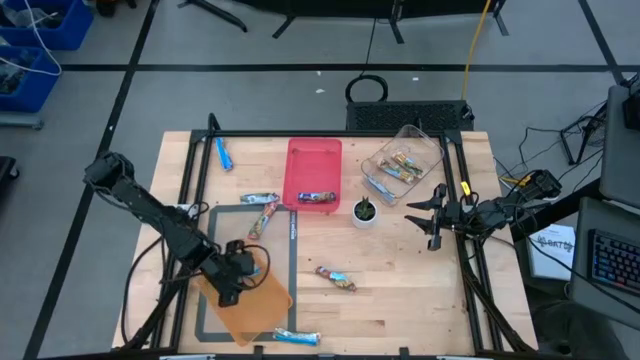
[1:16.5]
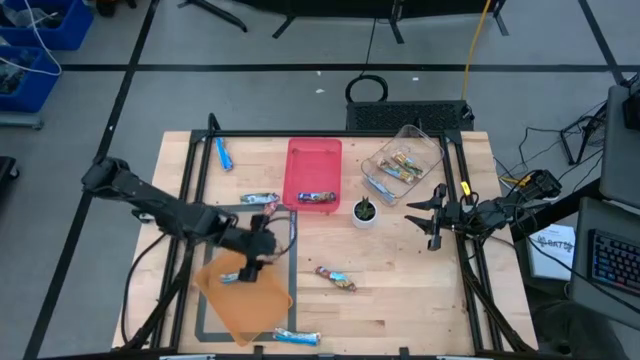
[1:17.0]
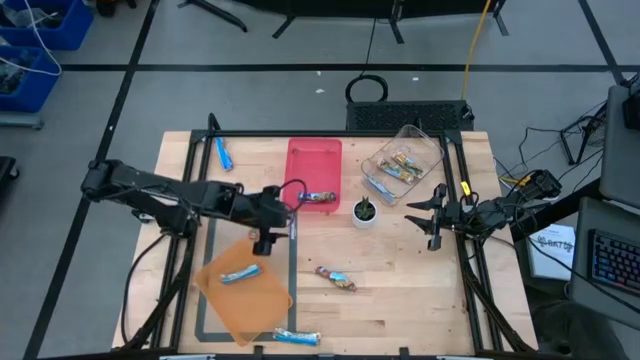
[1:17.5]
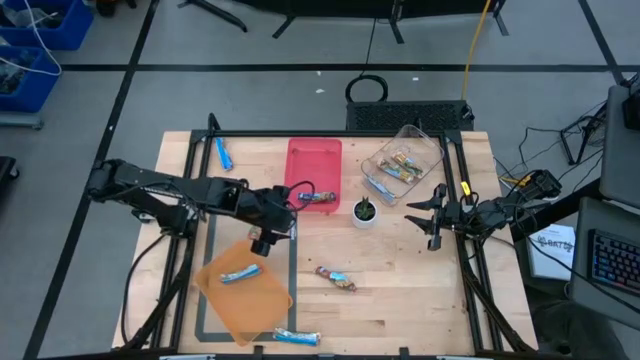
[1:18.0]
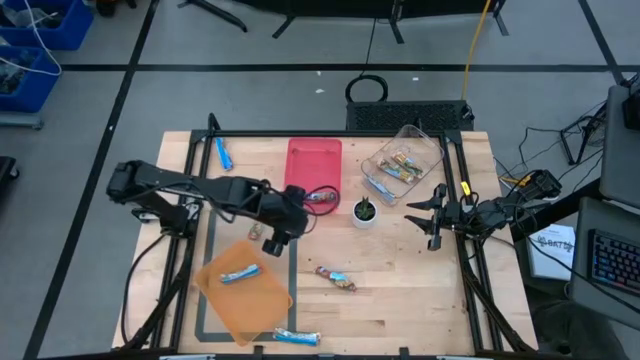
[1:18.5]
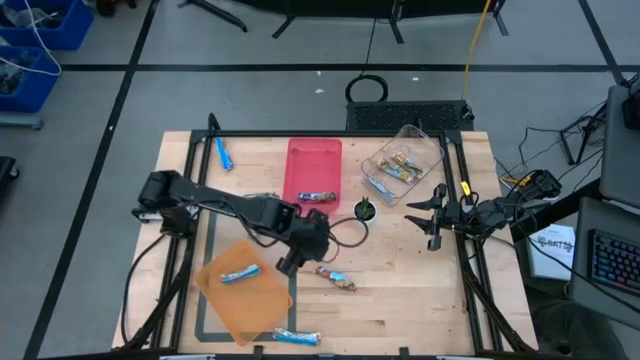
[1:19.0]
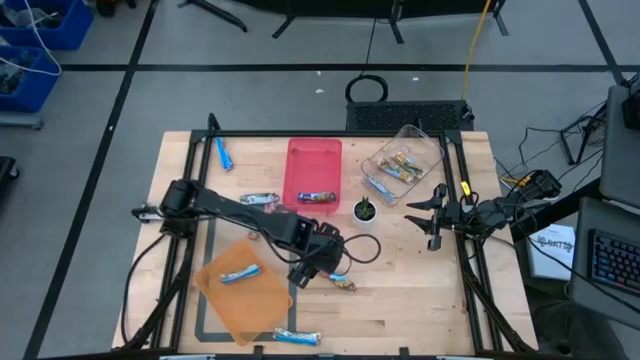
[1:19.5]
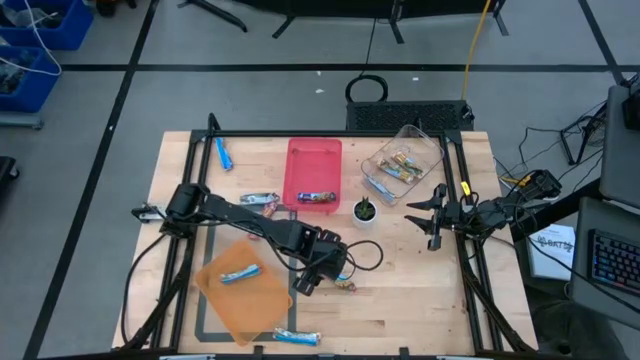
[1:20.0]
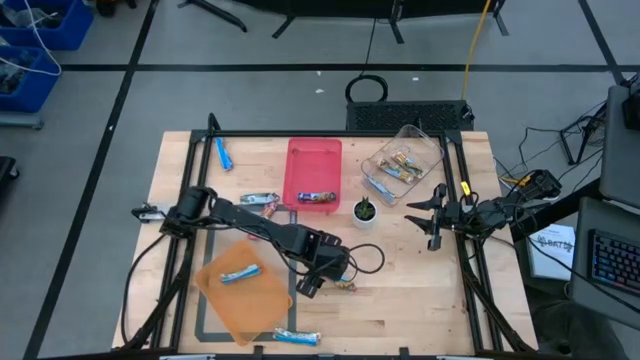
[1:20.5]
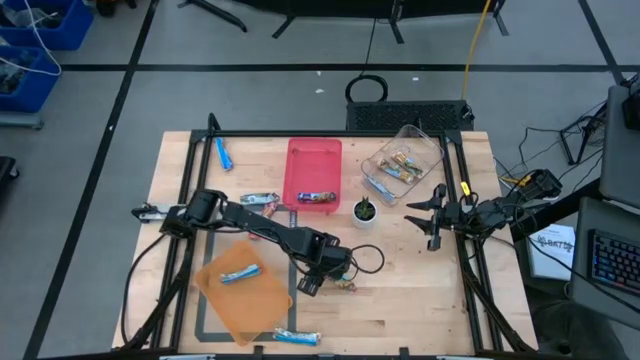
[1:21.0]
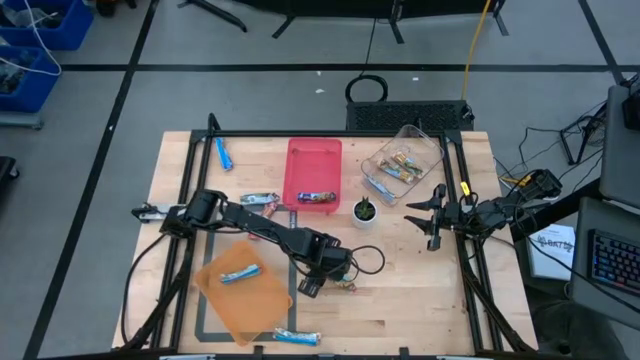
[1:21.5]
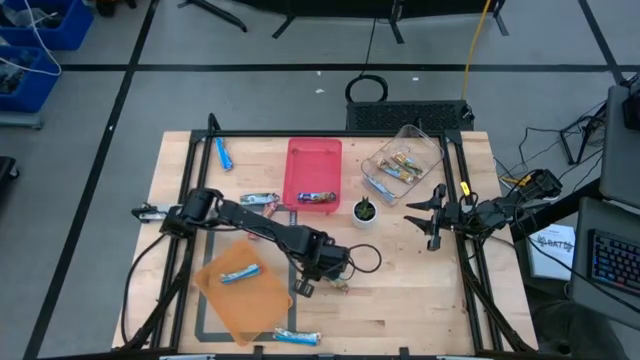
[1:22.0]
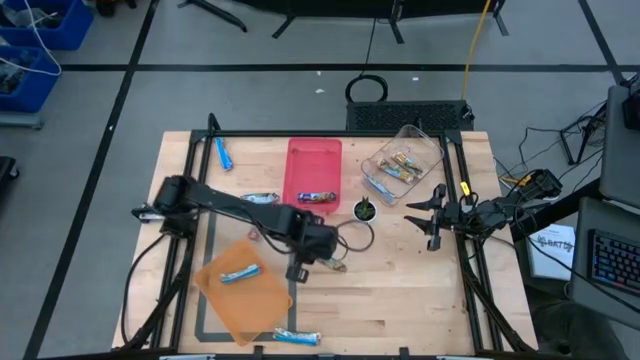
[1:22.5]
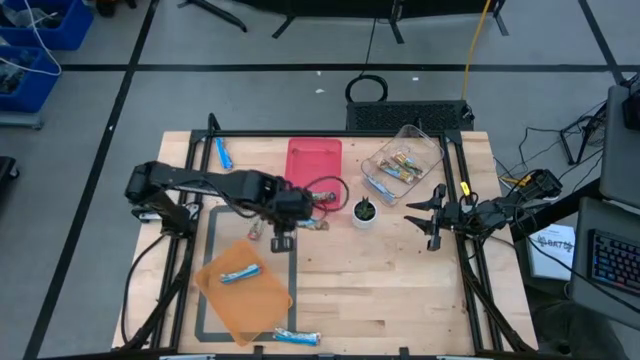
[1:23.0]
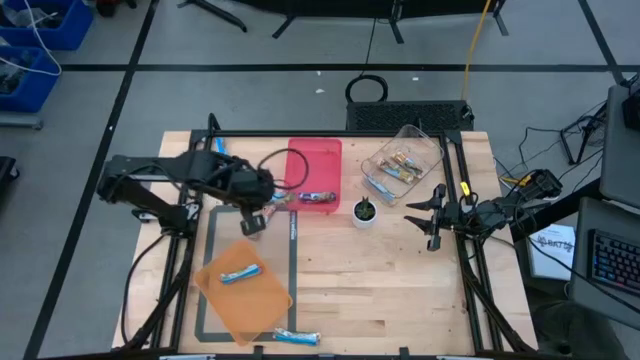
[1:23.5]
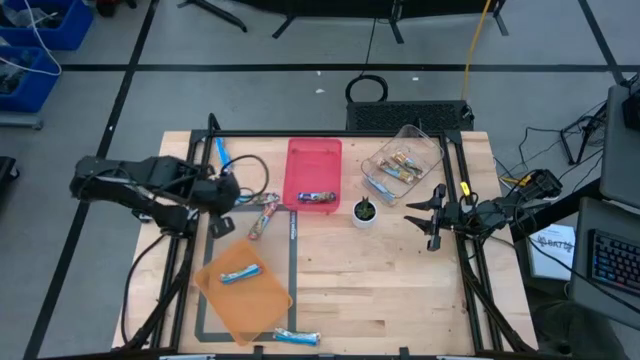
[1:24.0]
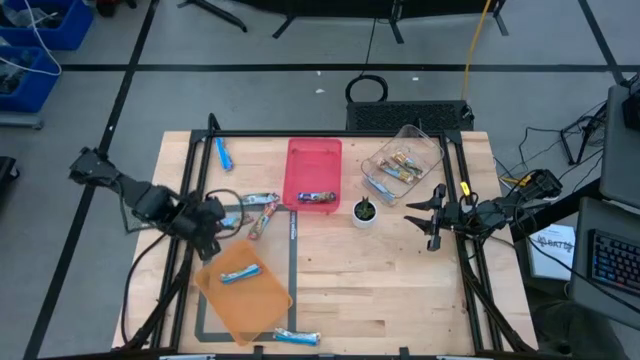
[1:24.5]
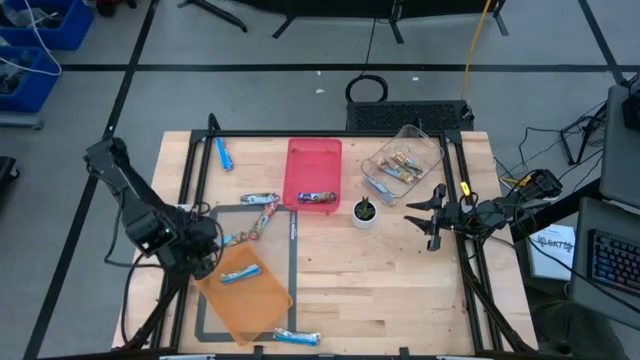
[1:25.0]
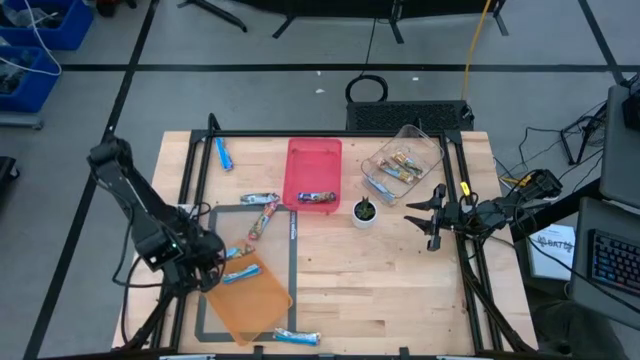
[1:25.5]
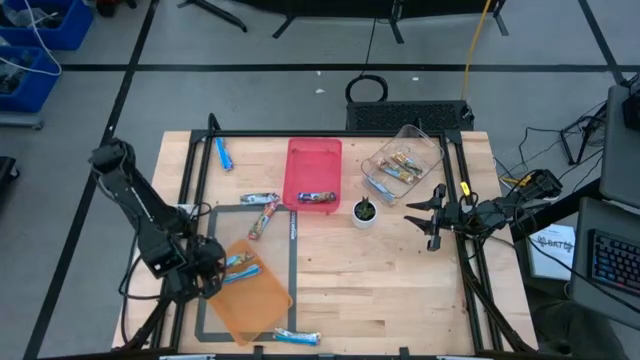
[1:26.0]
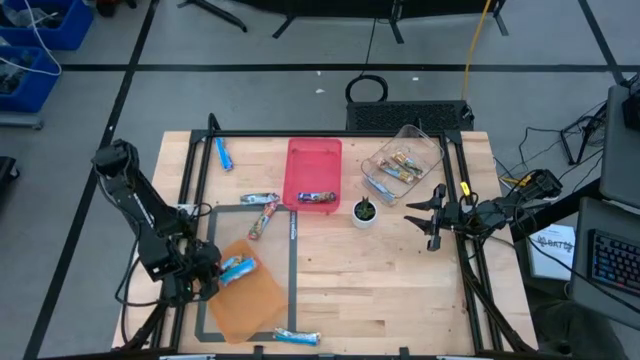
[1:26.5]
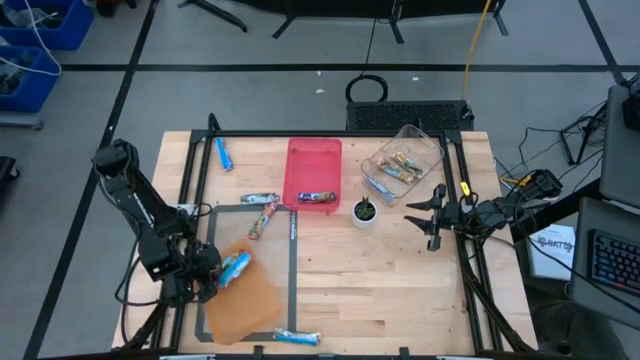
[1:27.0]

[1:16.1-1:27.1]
Task: Pick and place Granola Bars by type
Put the red granola bar into the orange bin

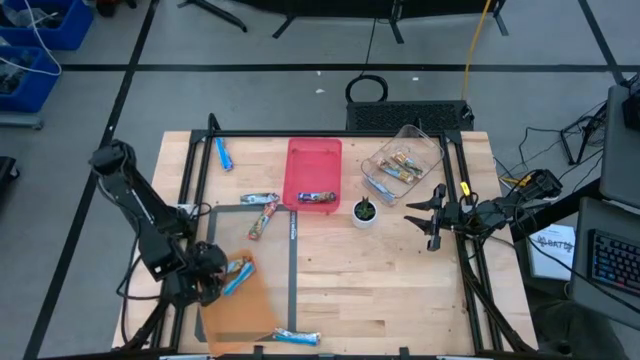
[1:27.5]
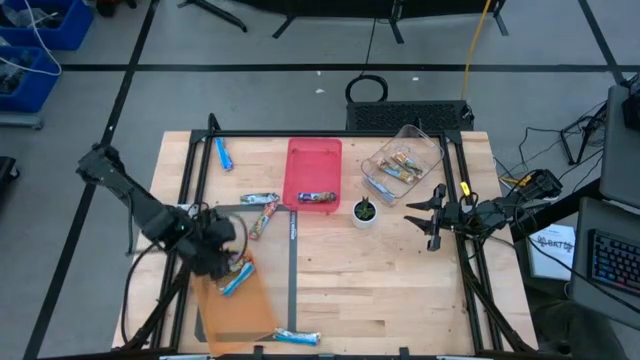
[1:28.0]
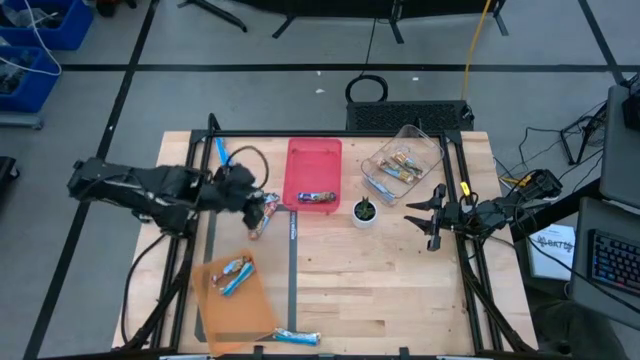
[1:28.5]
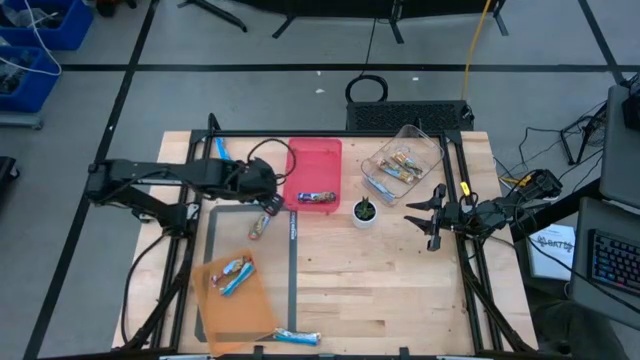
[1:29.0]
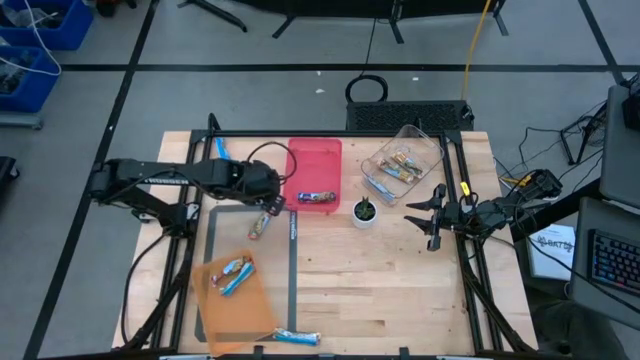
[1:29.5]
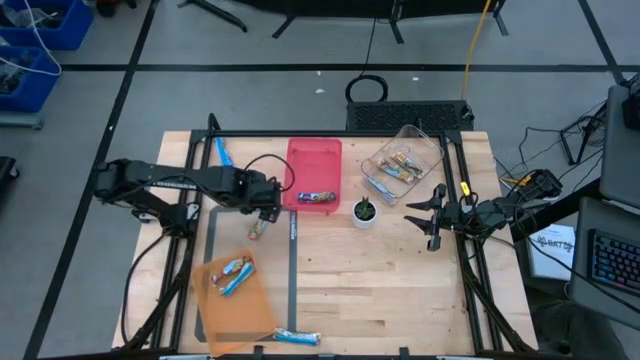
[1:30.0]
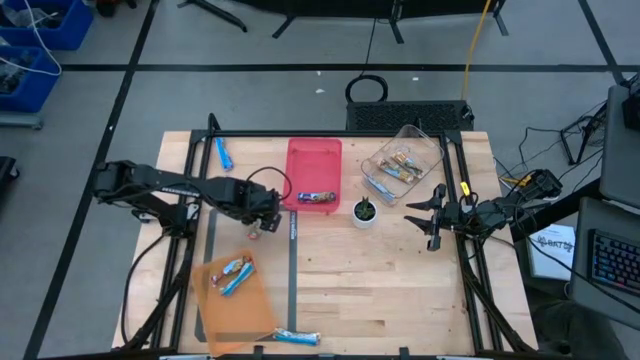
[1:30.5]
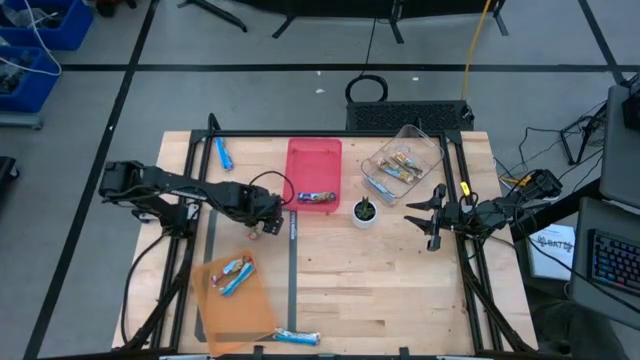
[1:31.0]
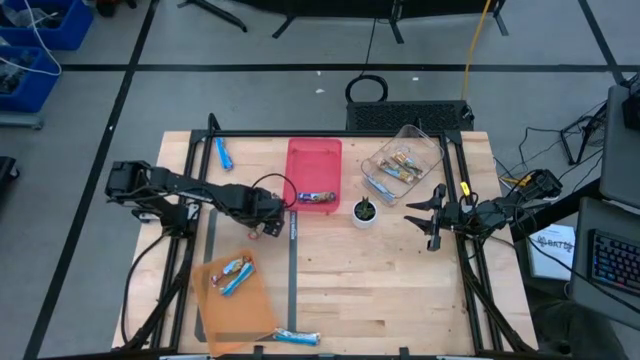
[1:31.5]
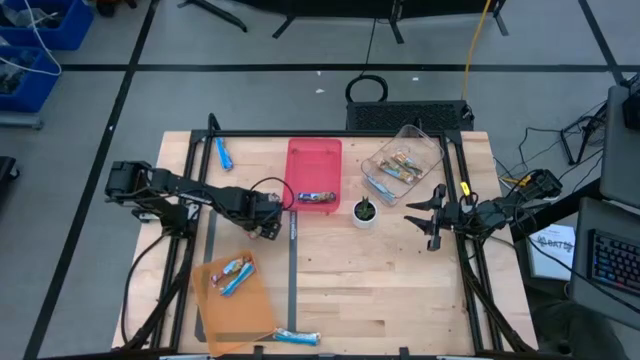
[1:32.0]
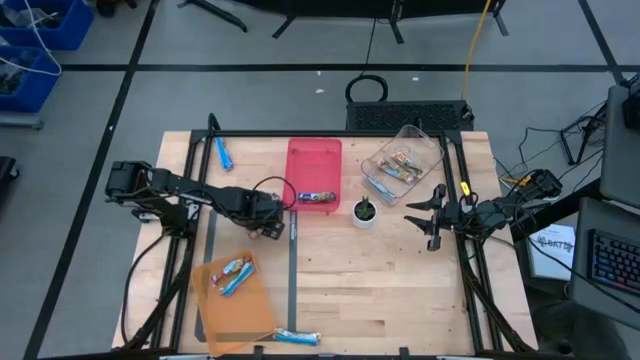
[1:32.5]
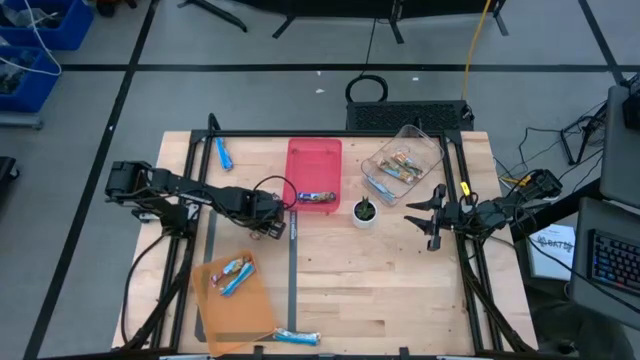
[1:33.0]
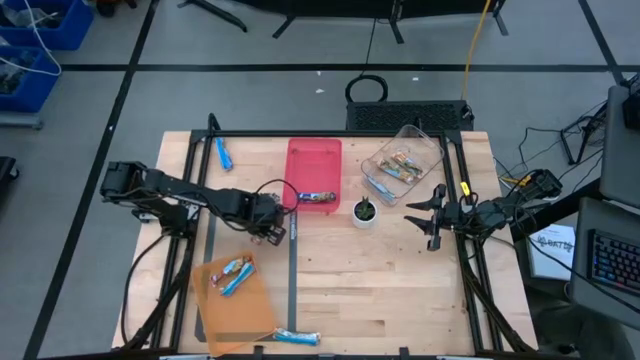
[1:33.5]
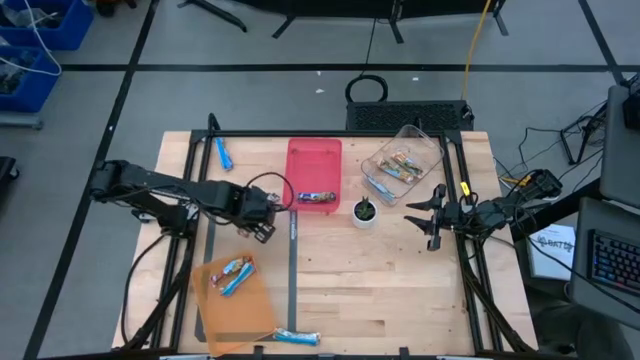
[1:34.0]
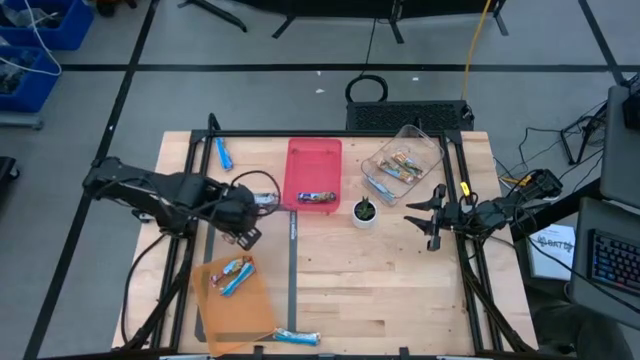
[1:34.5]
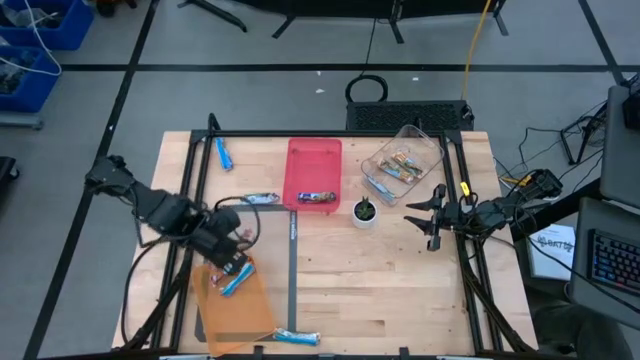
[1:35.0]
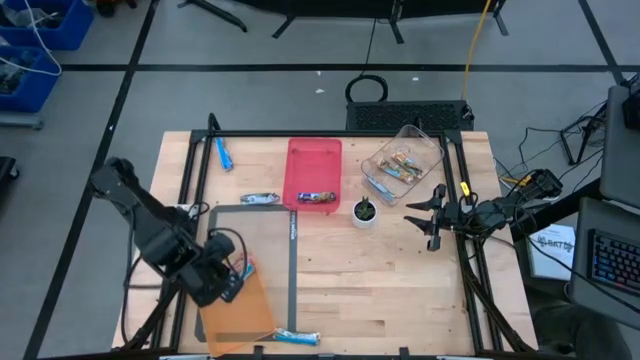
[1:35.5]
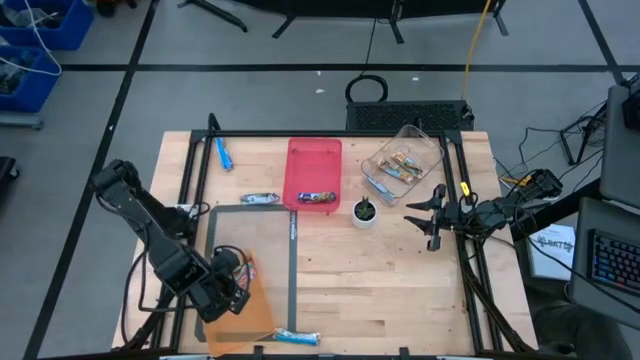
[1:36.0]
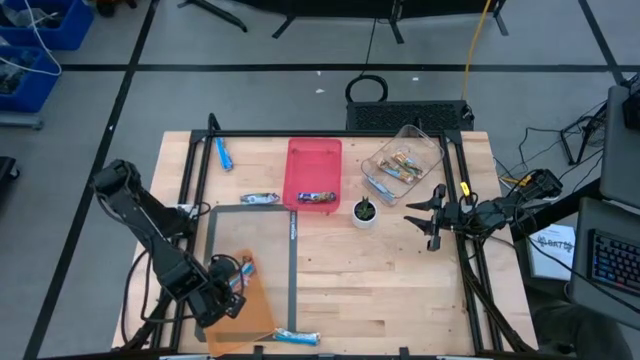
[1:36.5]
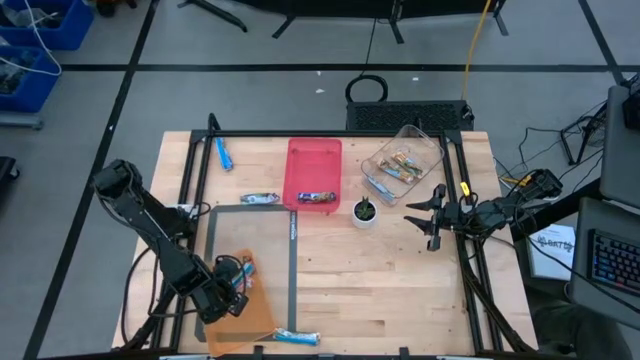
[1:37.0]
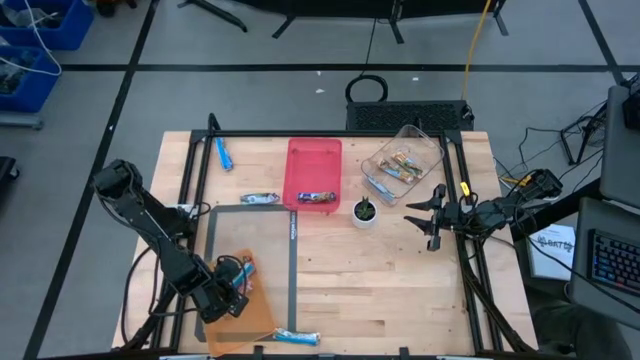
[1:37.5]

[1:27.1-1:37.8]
Put the red granola bar into the orange bin

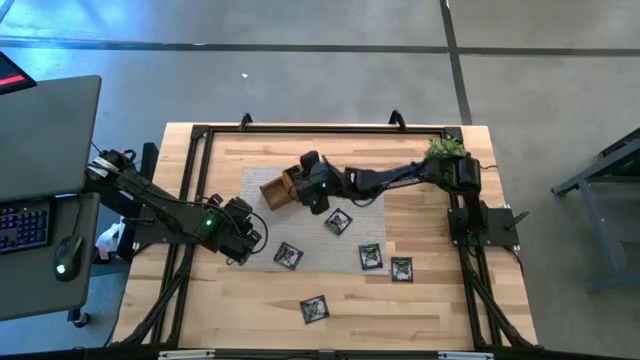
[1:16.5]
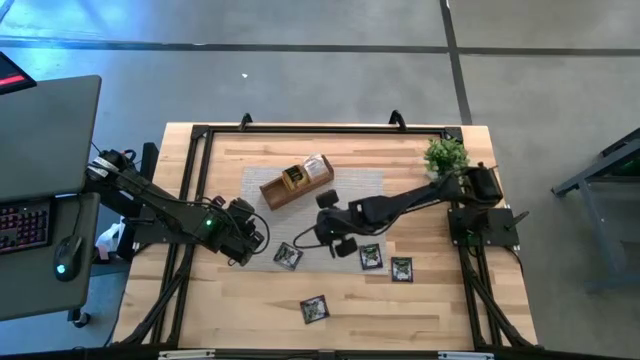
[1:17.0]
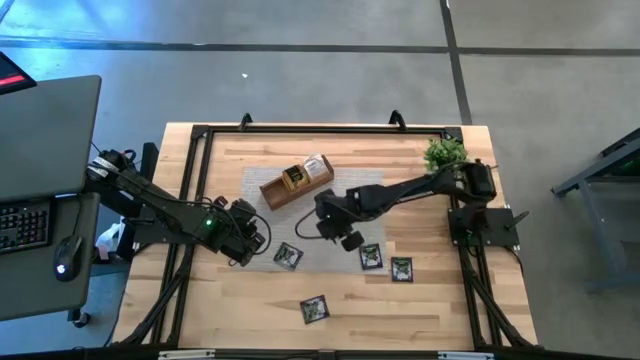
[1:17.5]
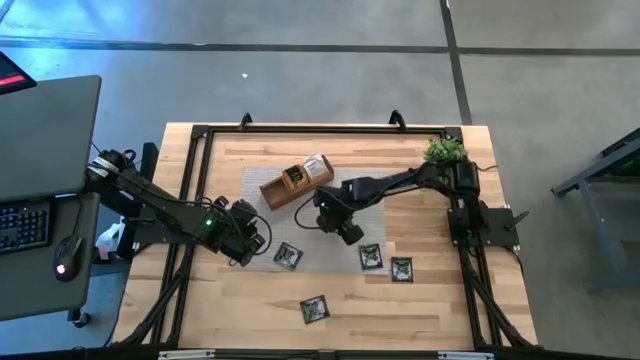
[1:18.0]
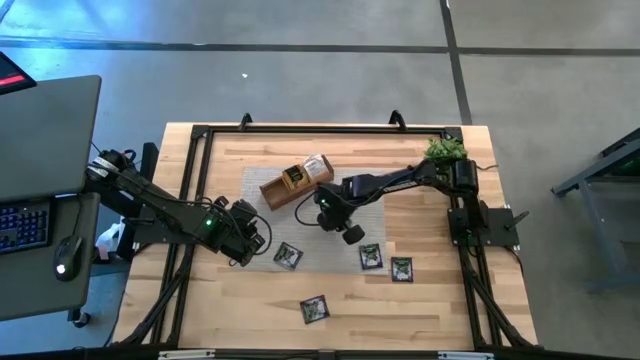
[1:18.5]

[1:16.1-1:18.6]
Task: Pick & Place Tea
Put the purple tea bag into the left section of the wooden organizer
